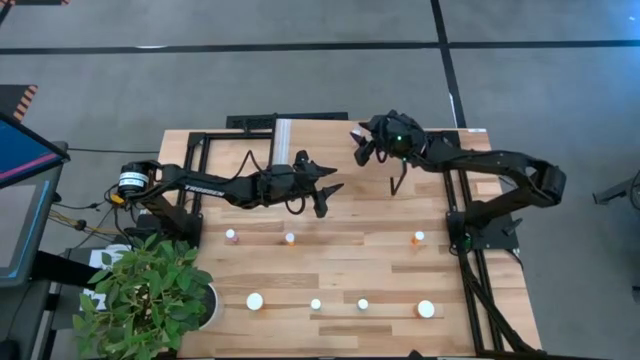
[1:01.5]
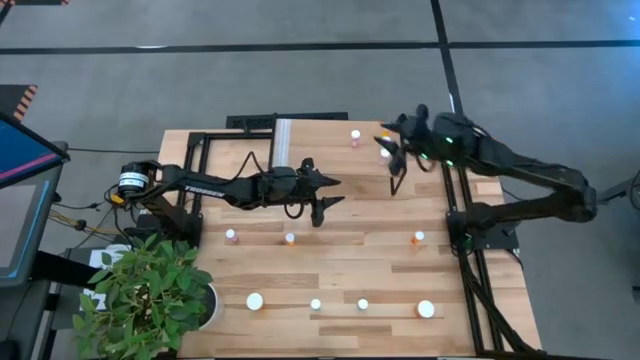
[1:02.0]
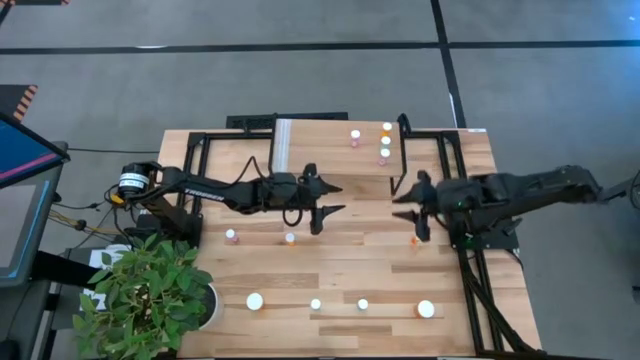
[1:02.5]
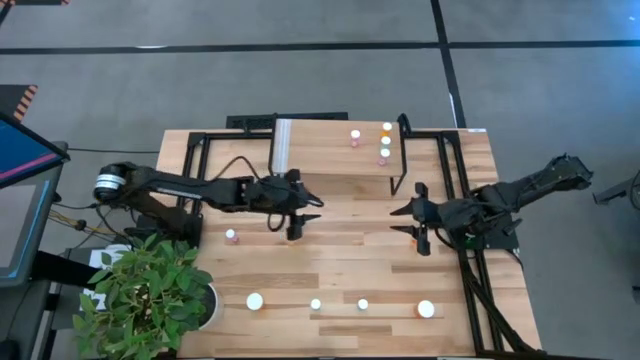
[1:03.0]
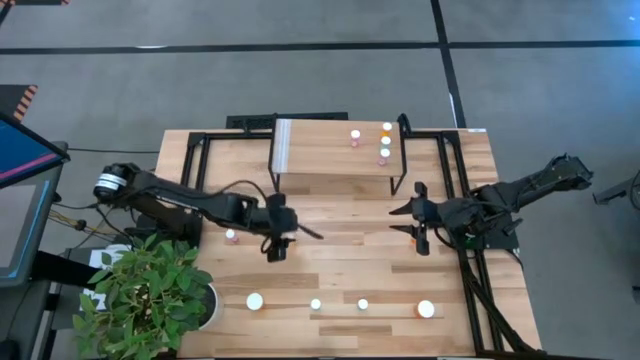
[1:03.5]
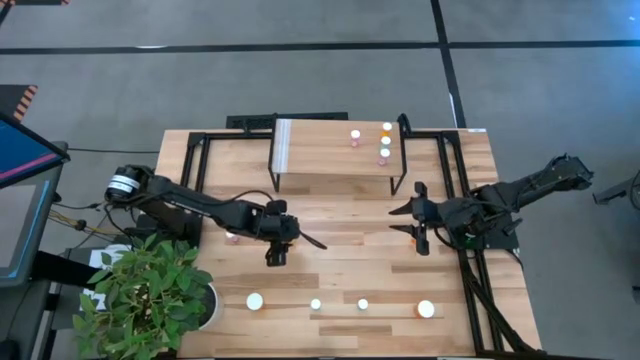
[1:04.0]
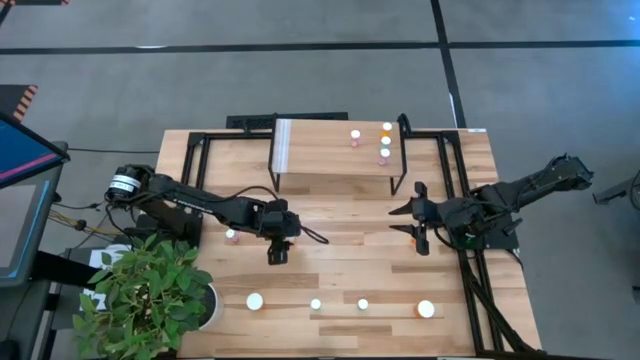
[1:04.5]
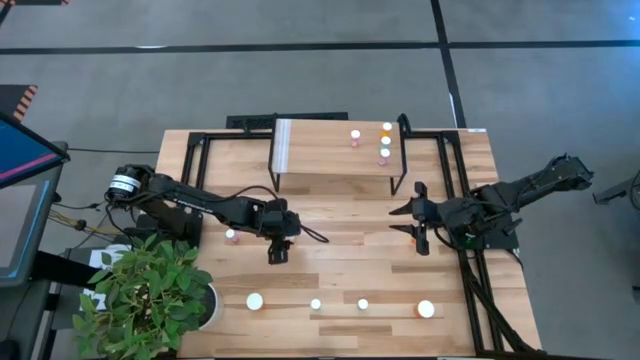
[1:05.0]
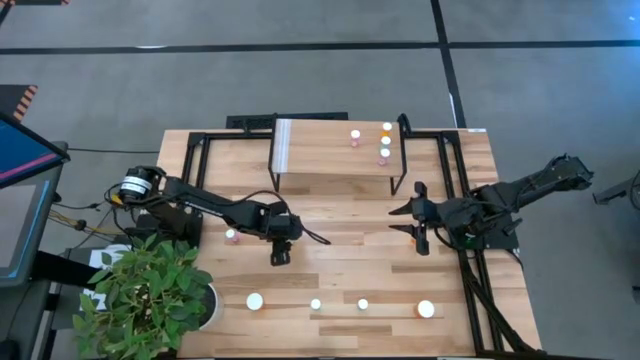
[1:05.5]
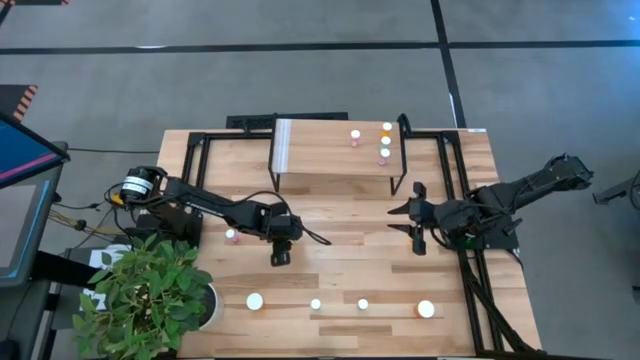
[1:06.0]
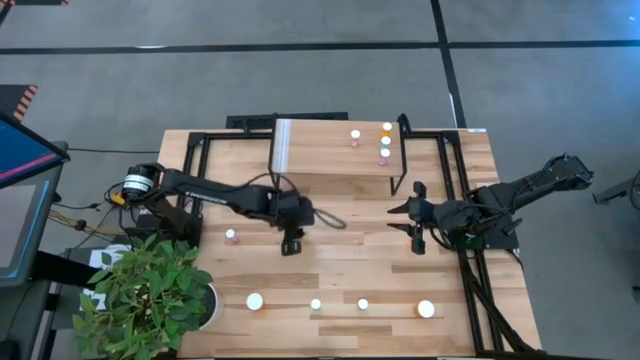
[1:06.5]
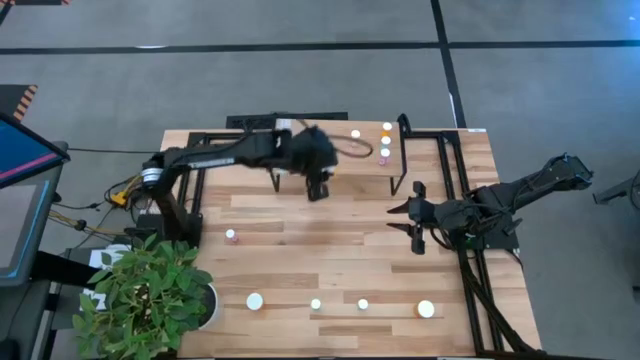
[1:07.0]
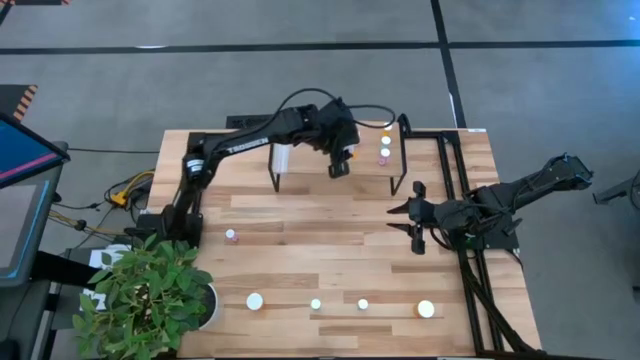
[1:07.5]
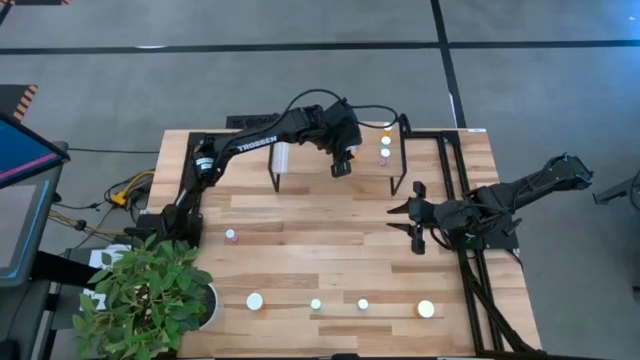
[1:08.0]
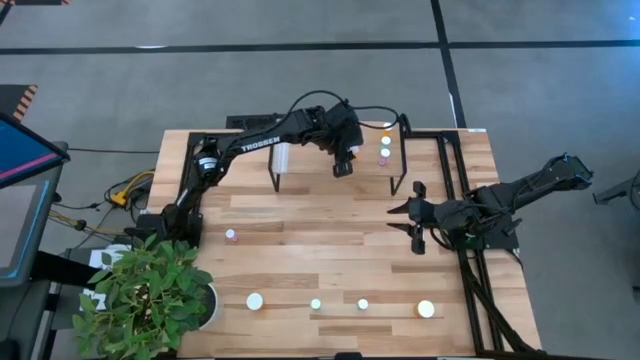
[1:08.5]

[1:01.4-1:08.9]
Task: Pick and place medicine bottles onto shelf by color
Put the left small orange pill bottle on the shelf

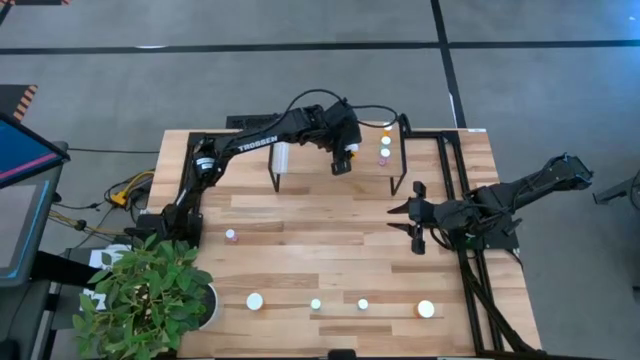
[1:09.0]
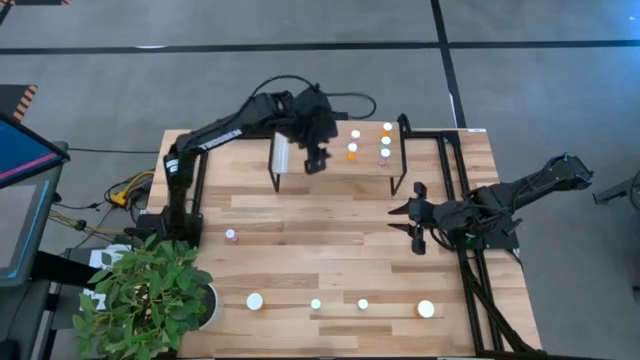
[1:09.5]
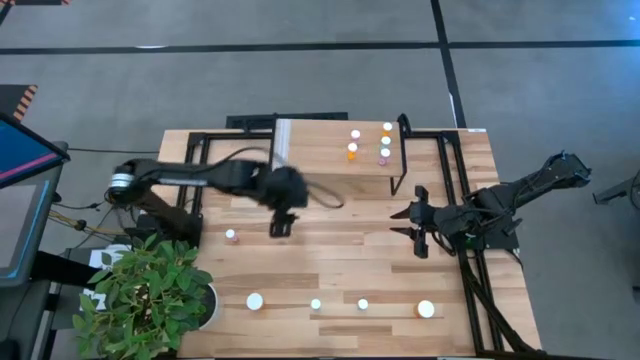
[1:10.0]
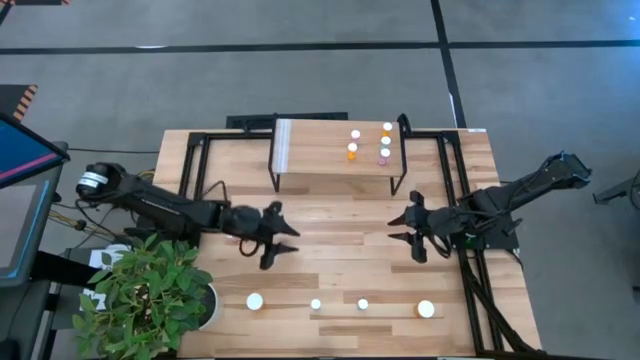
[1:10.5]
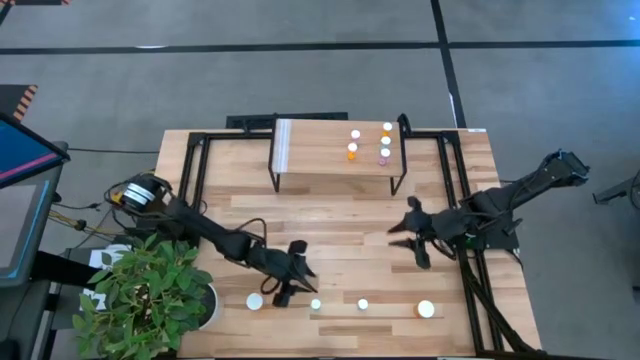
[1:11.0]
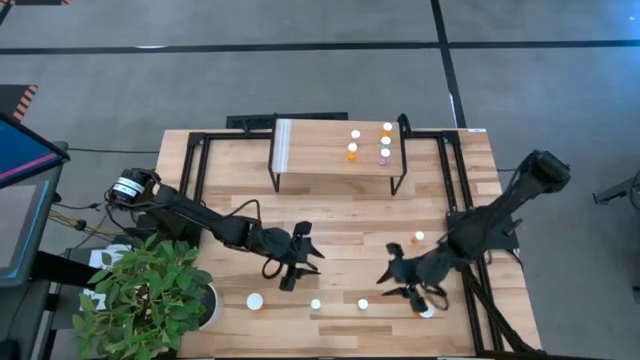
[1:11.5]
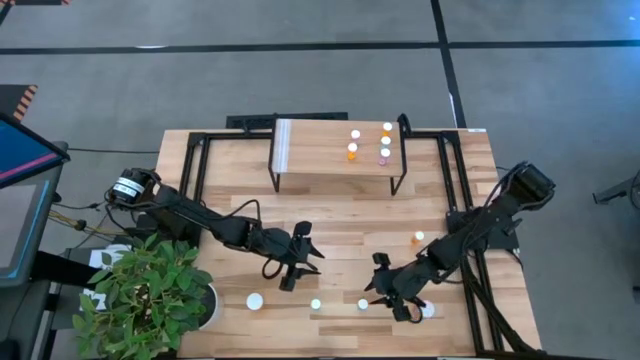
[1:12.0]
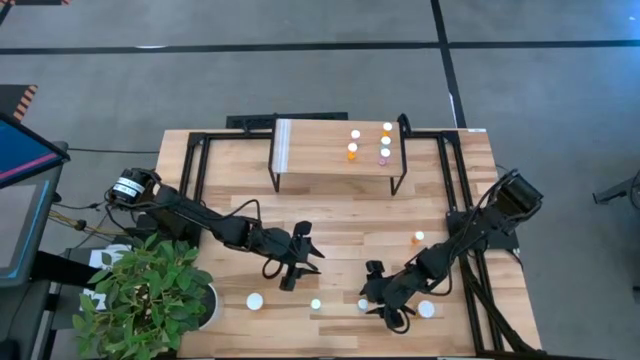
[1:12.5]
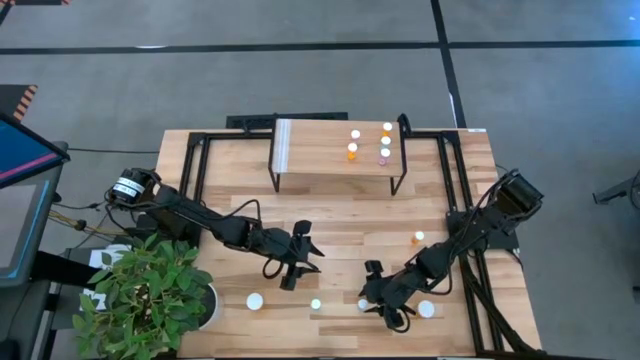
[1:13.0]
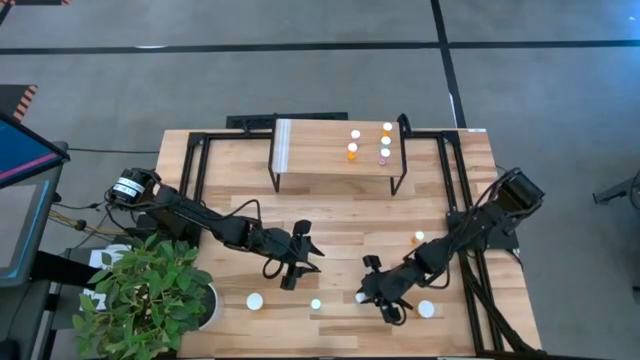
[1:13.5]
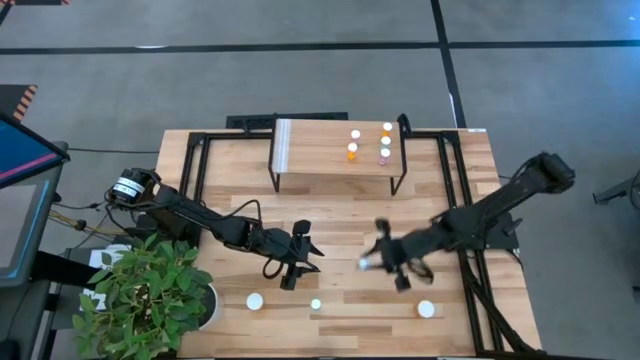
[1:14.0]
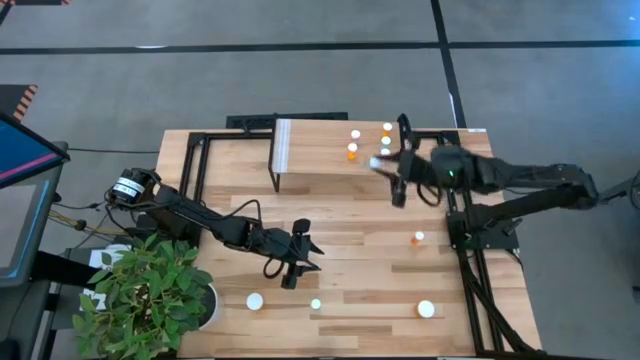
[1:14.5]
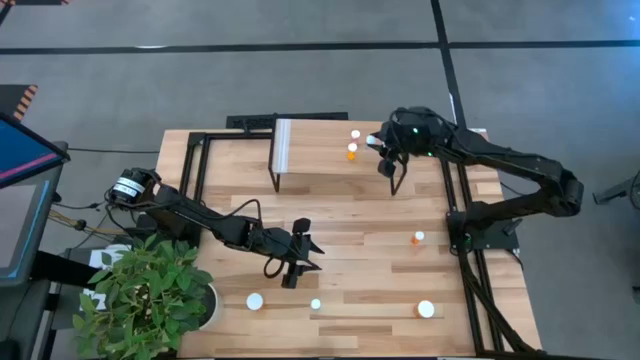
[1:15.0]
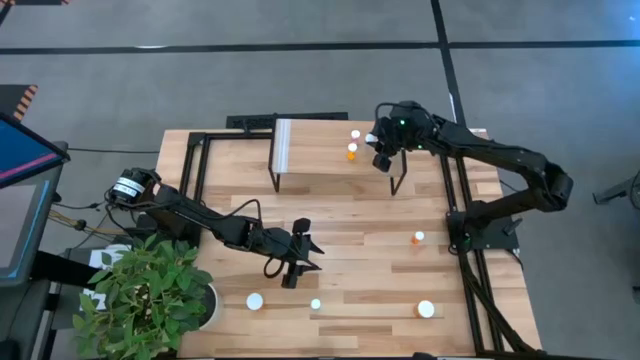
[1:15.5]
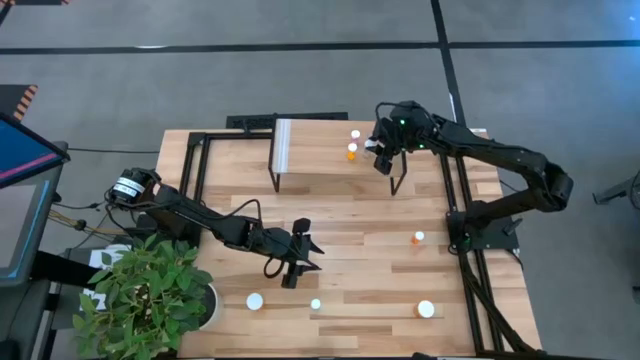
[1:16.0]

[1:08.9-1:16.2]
Put the right green pill bottle on the shelf

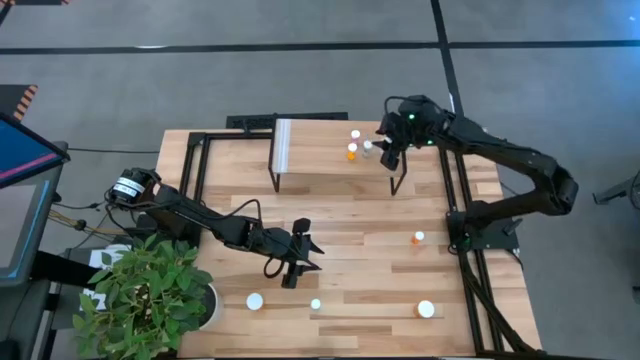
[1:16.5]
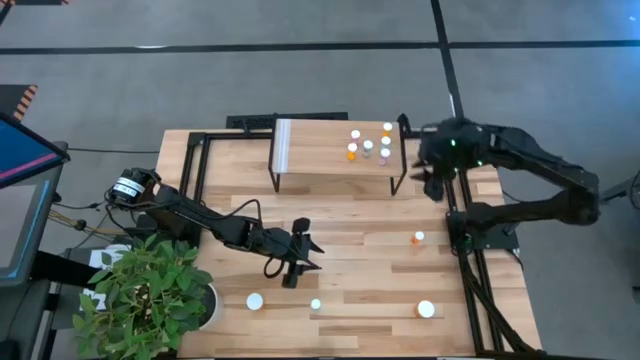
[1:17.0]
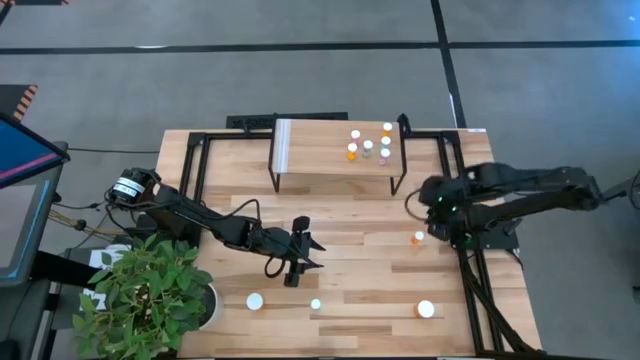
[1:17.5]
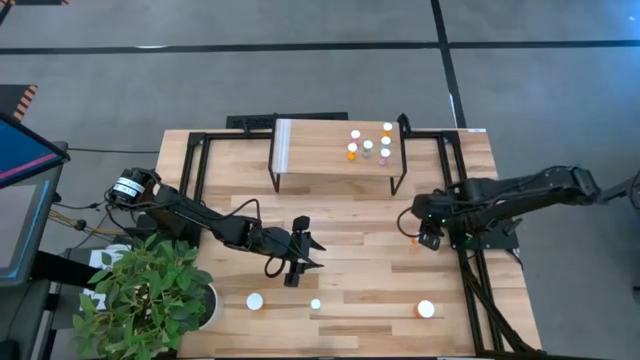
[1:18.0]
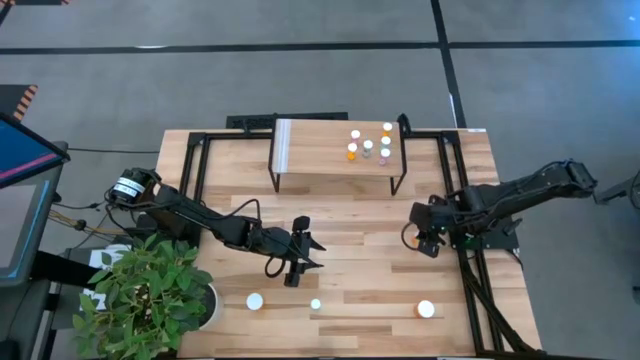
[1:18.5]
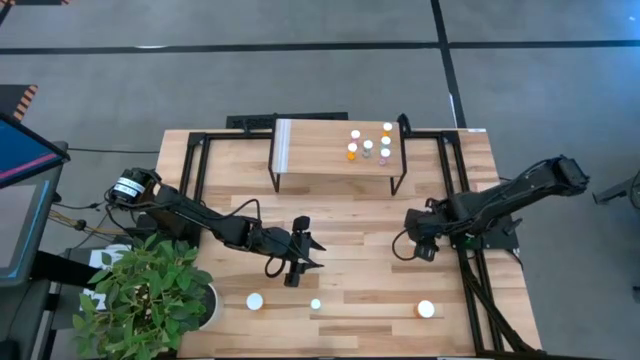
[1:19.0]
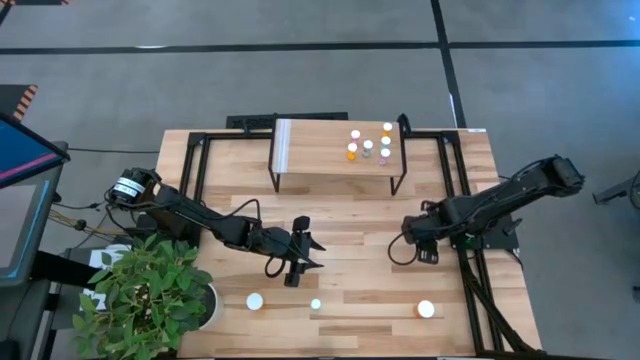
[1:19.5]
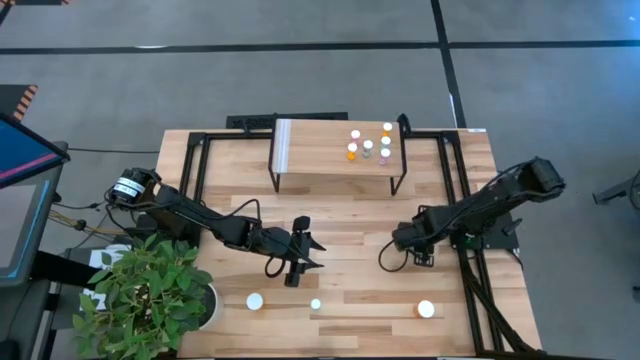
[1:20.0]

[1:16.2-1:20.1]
Put the small orange pill bottle on the shelf

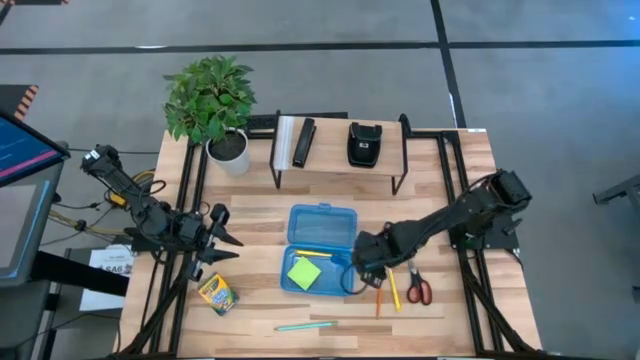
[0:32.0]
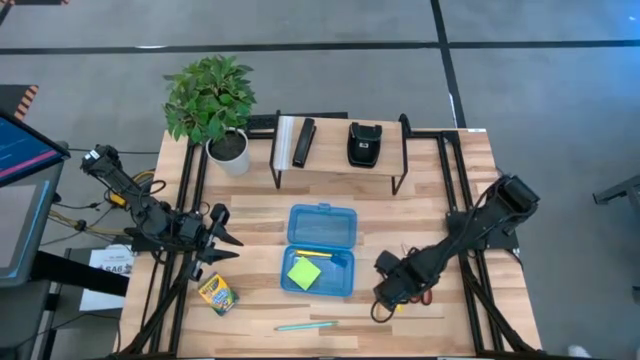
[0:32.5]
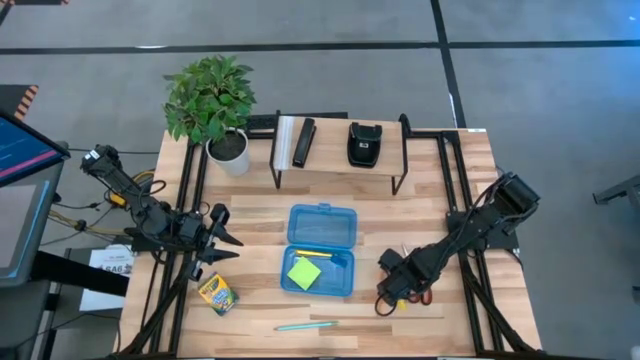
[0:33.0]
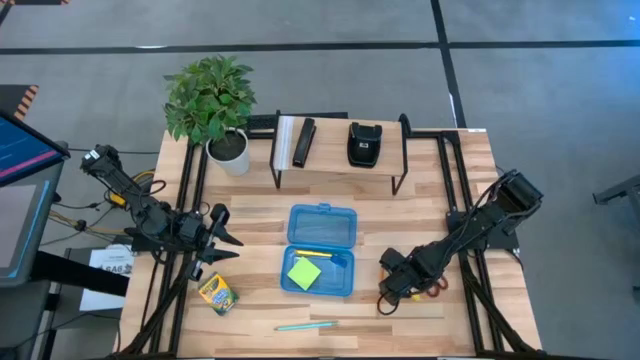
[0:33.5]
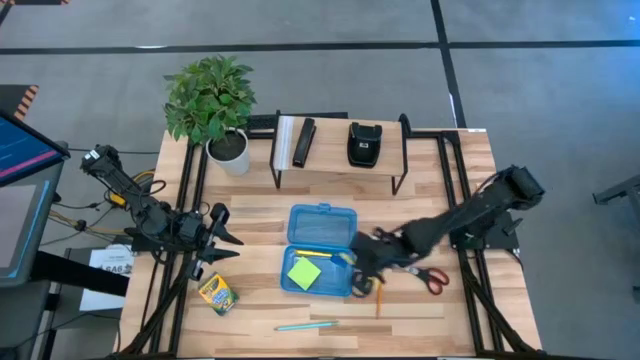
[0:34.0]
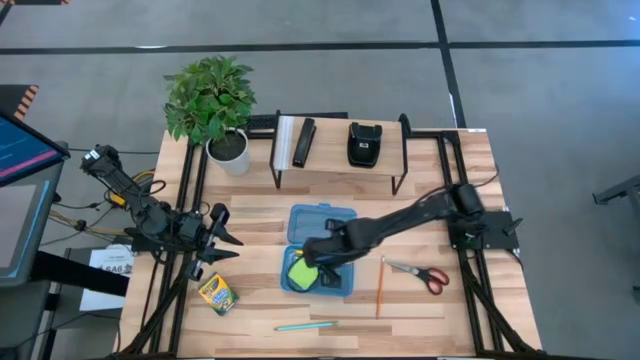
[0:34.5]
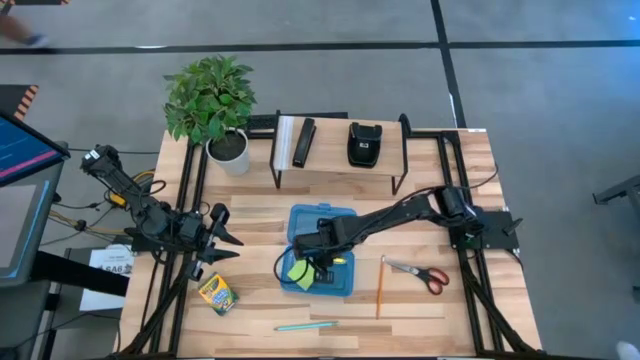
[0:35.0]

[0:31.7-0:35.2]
Task: Pack school essentials
Put the yellow pen into the blue supply box
